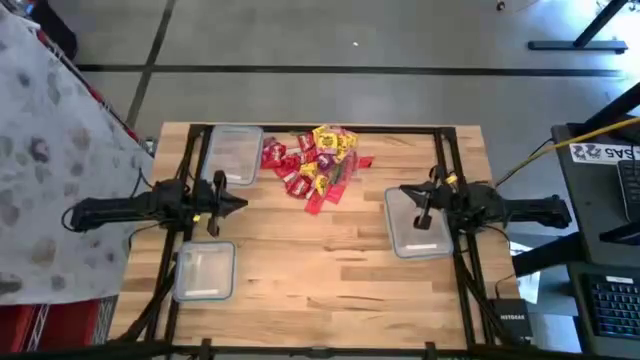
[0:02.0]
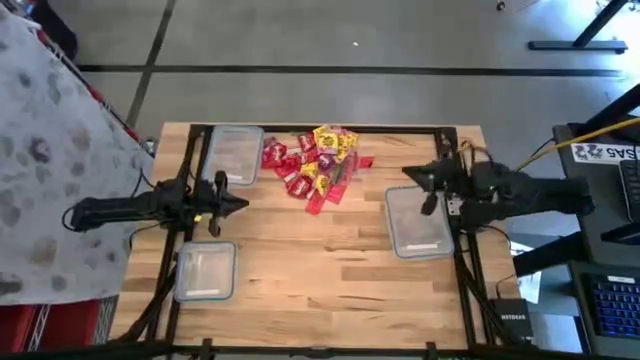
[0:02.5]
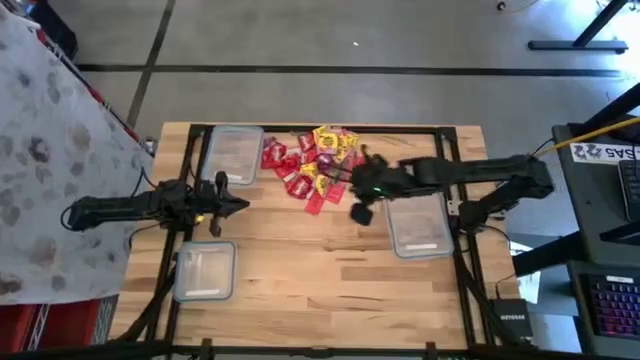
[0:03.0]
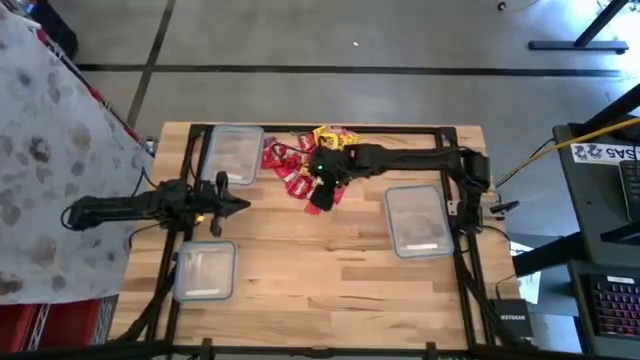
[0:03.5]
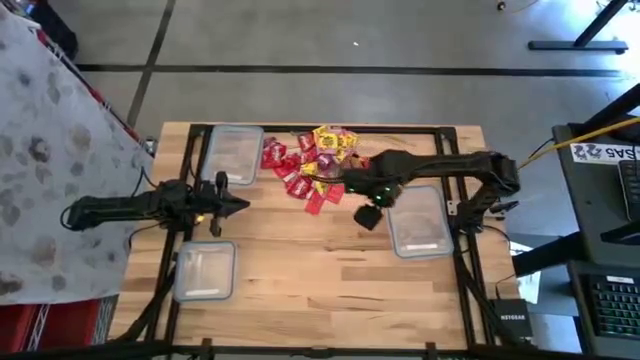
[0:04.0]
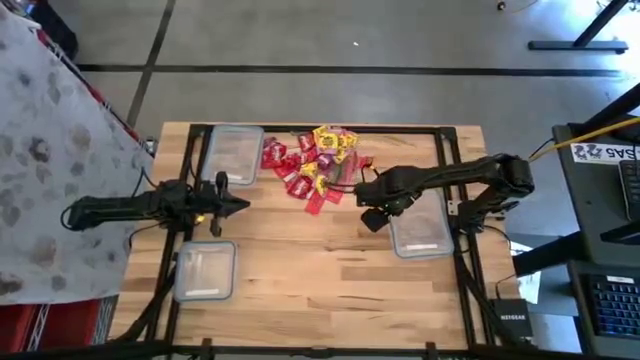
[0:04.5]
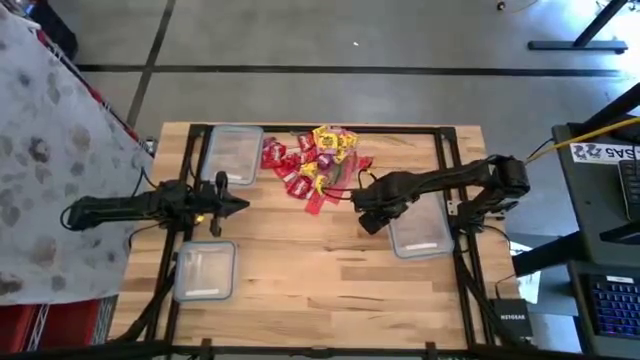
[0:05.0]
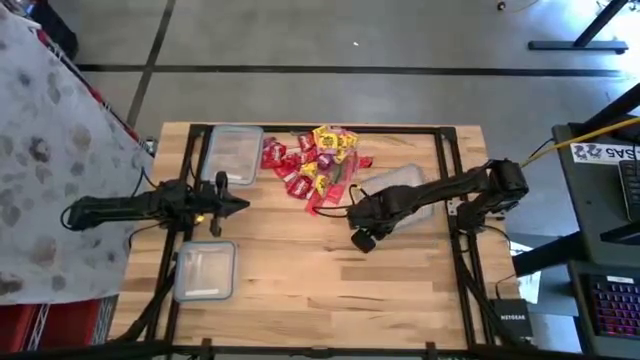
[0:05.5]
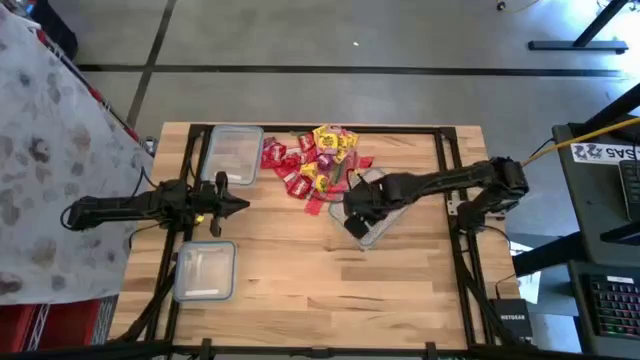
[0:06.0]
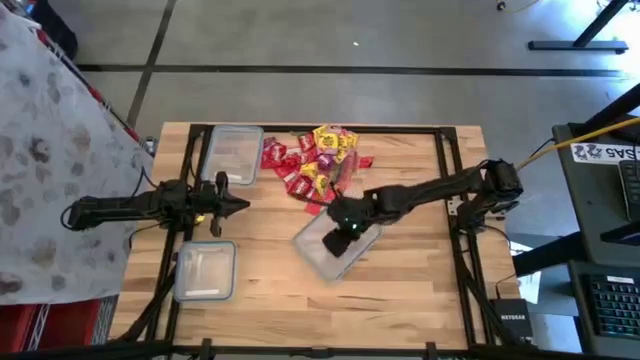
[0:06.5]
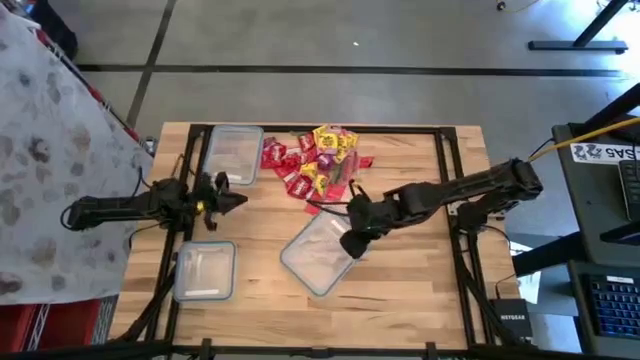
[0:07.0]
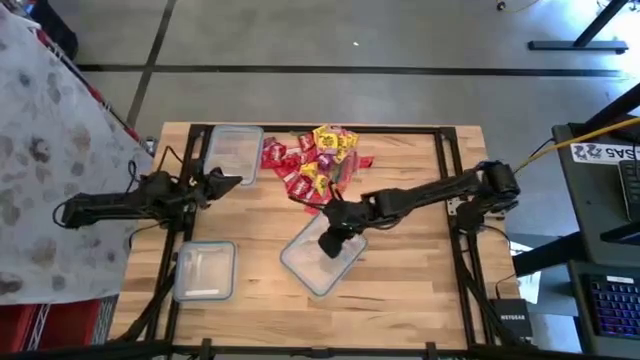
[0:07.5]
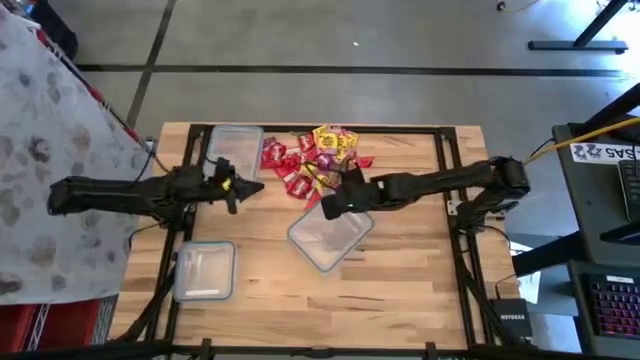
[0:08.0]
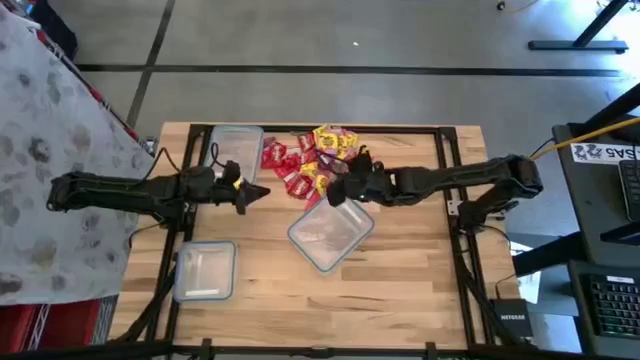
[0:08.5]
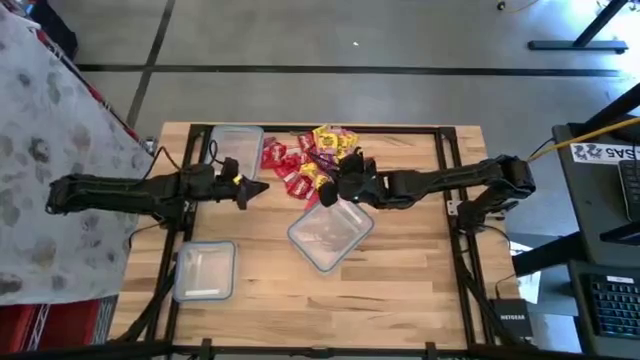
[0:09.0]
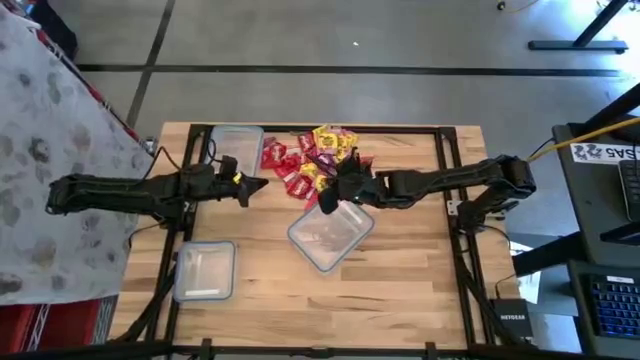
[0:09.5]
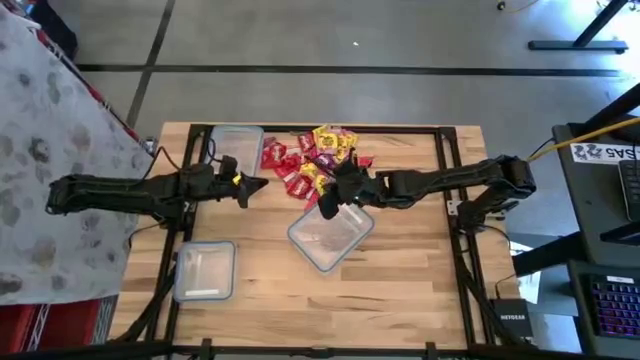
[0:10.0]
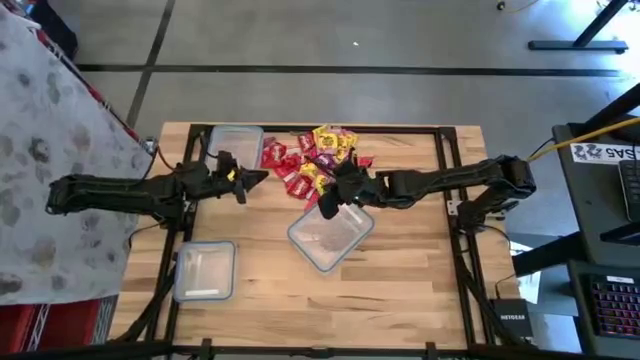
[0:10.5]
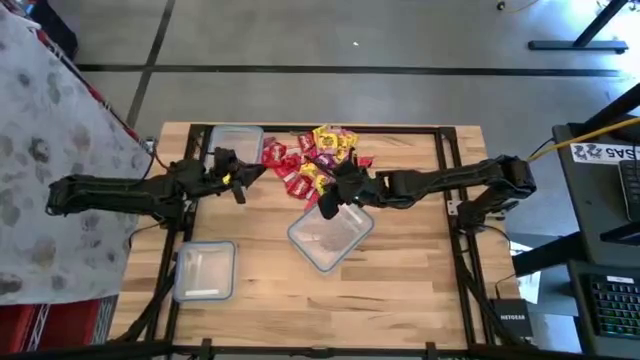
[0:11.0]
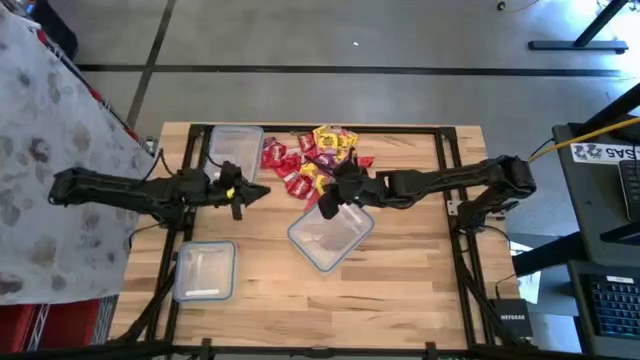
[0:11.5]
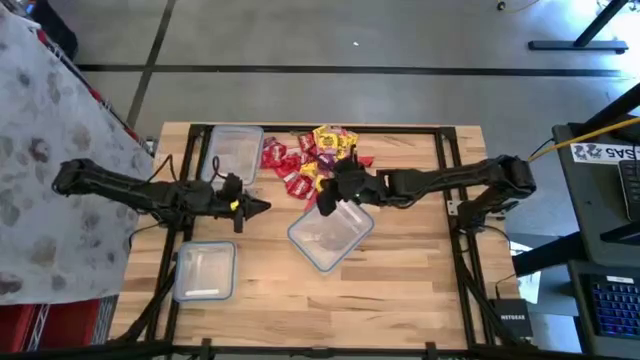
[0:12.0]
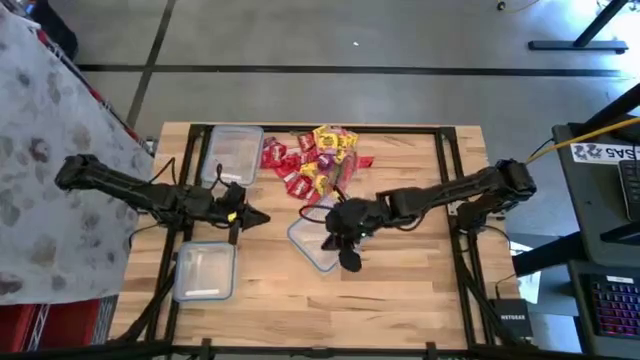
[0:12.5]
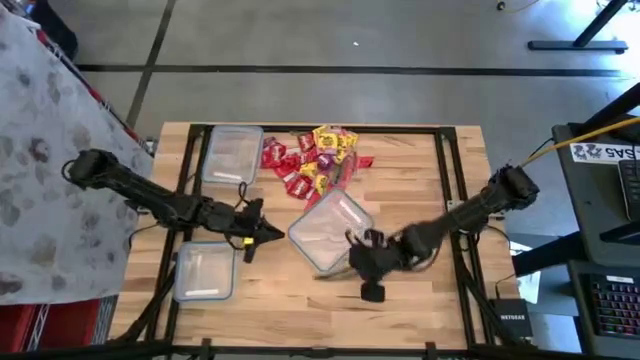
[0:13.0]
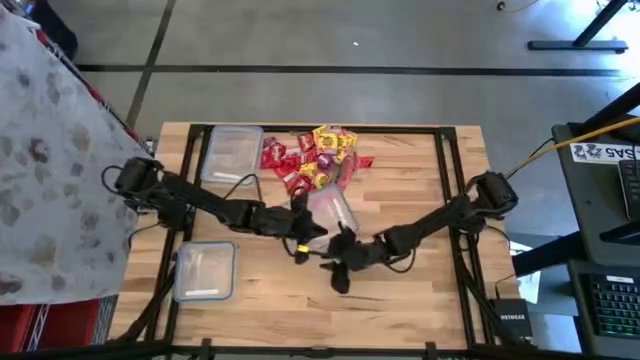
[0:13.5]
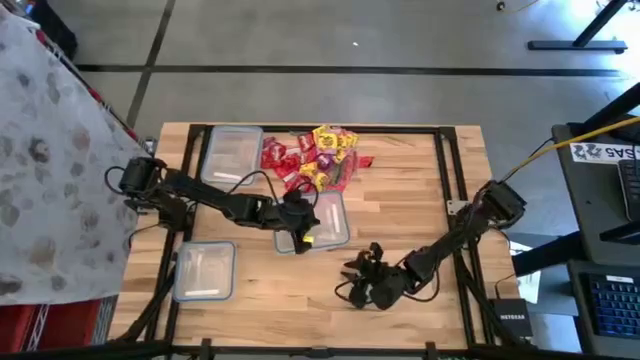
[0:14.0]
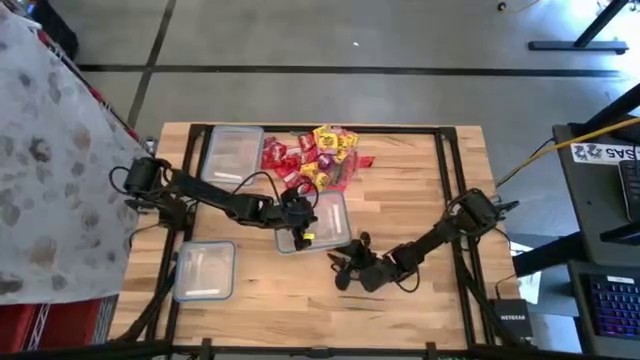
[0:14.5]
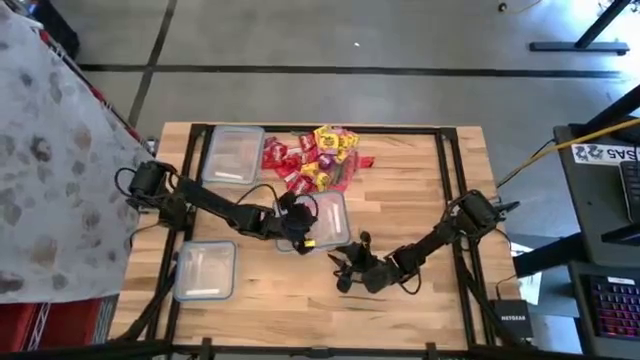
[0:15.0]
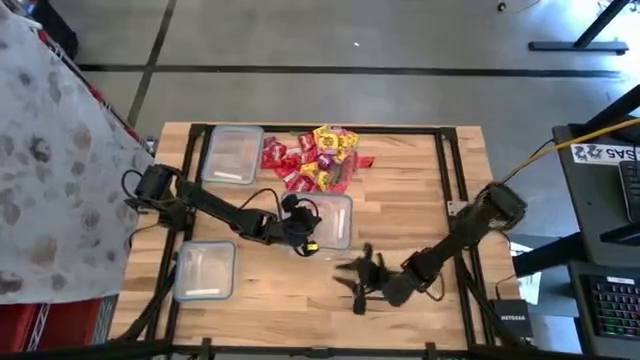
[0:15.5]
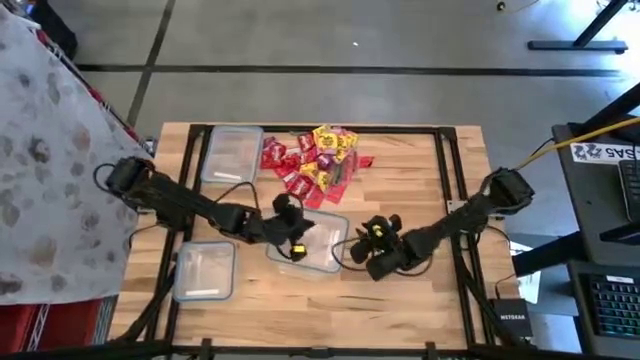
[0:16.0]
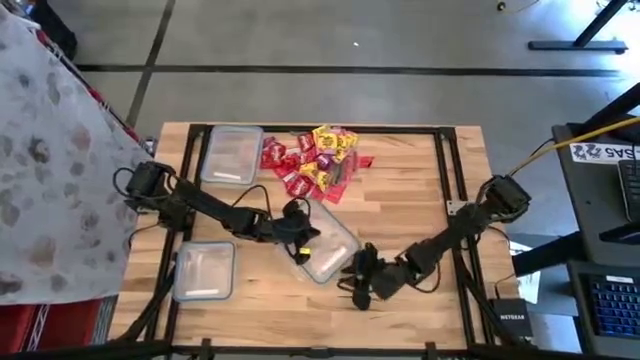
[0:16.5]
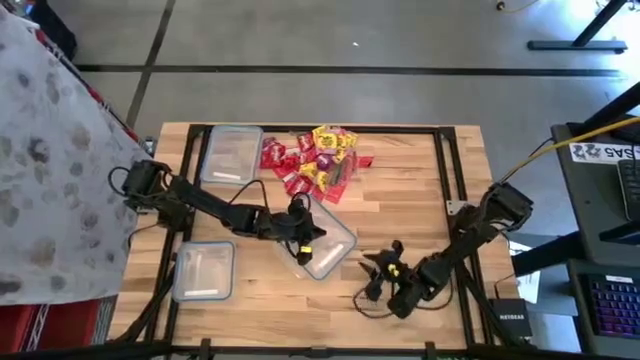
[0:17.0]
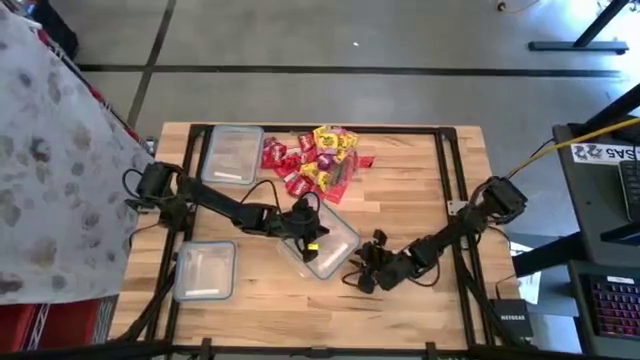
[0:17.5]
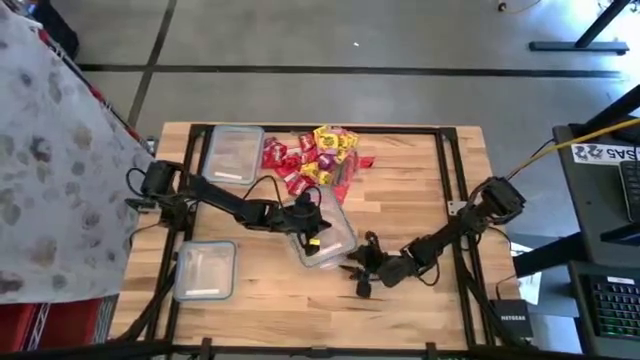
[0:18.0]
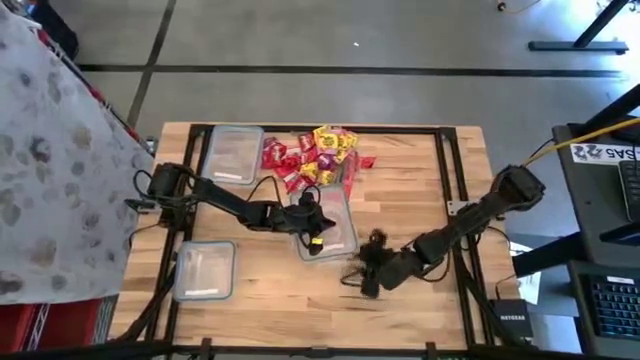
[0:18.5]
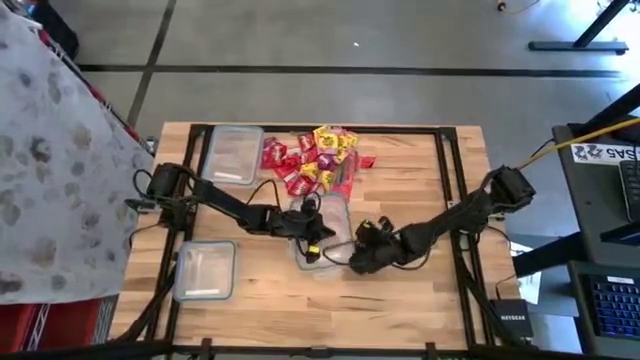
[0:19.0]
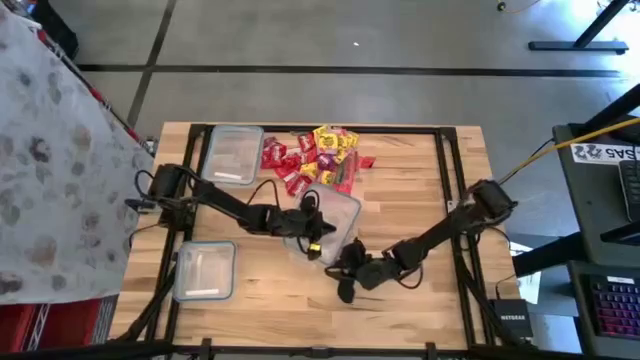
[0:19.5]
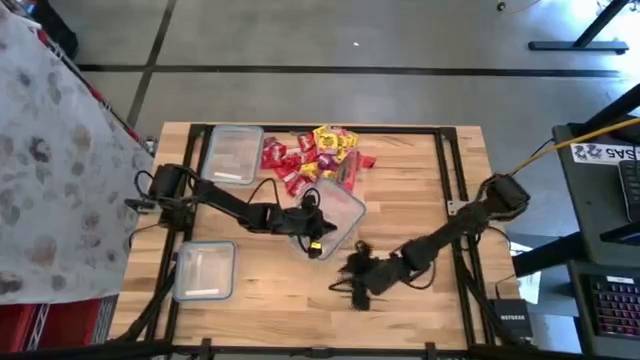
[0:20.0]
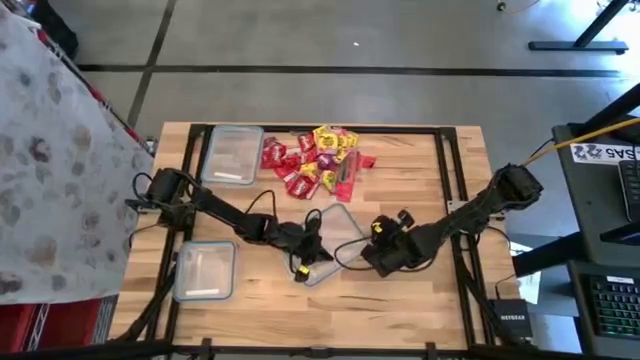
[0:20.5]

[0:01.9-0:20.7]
Task: Sort candy
Open the right transparent bin
